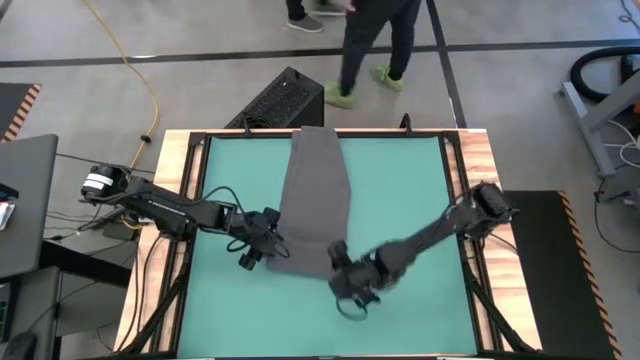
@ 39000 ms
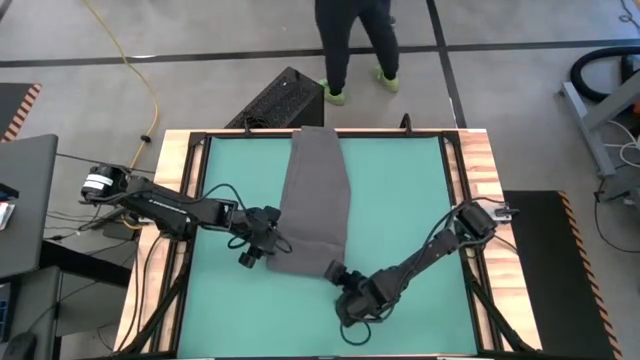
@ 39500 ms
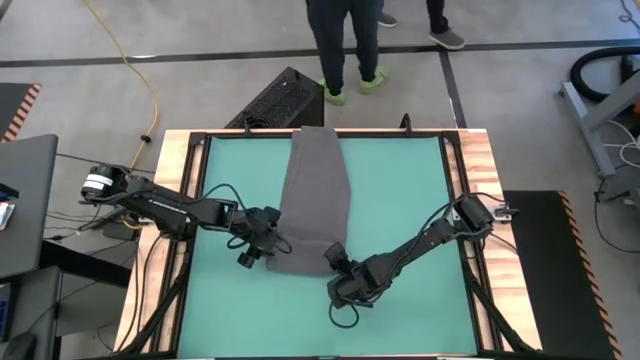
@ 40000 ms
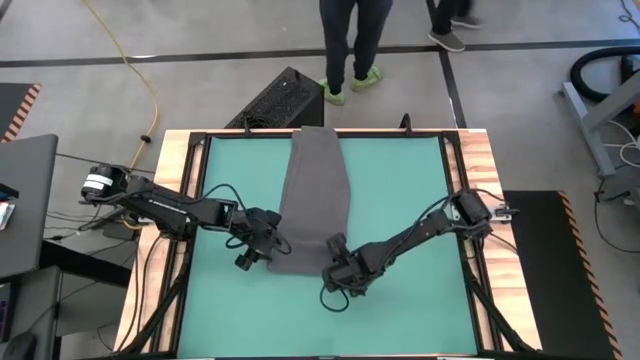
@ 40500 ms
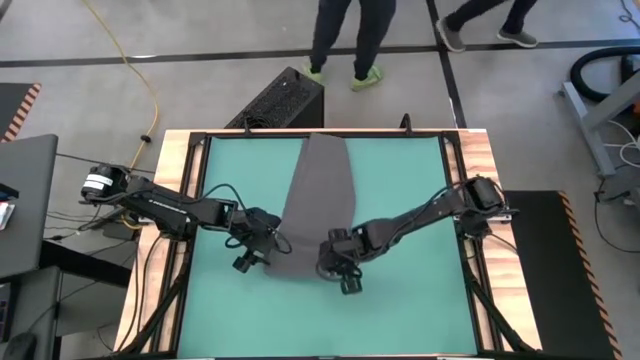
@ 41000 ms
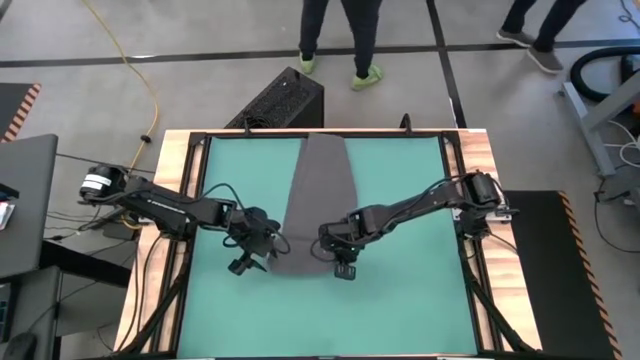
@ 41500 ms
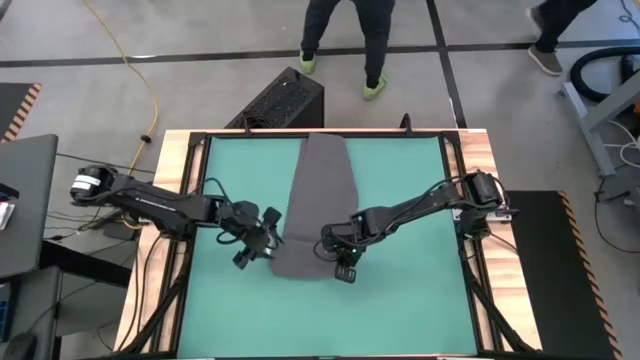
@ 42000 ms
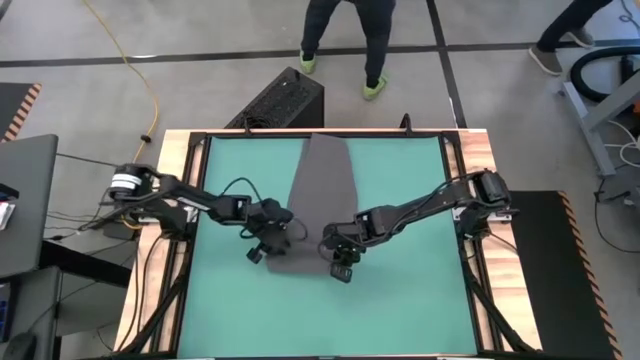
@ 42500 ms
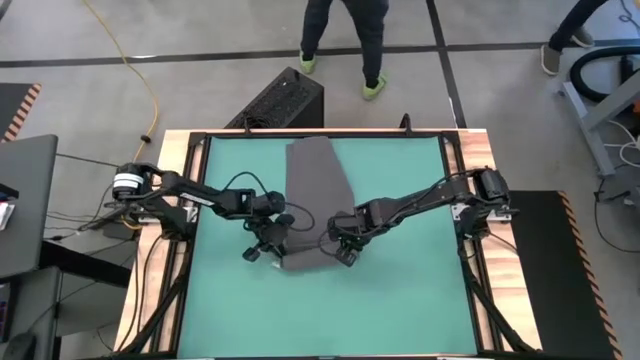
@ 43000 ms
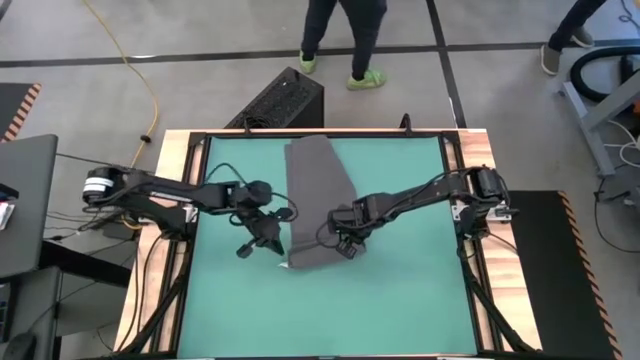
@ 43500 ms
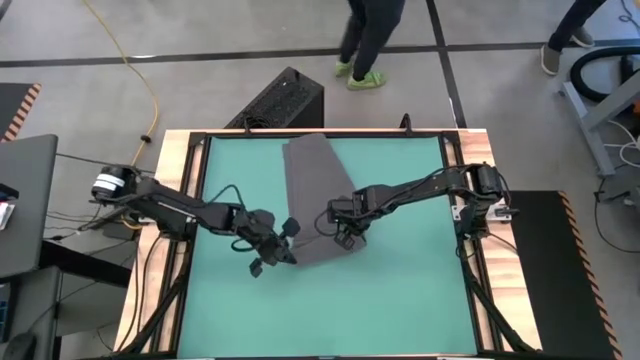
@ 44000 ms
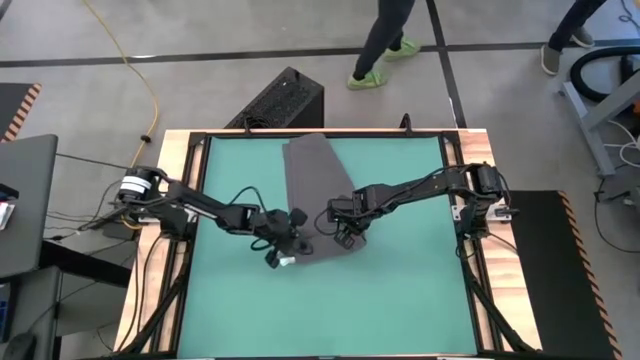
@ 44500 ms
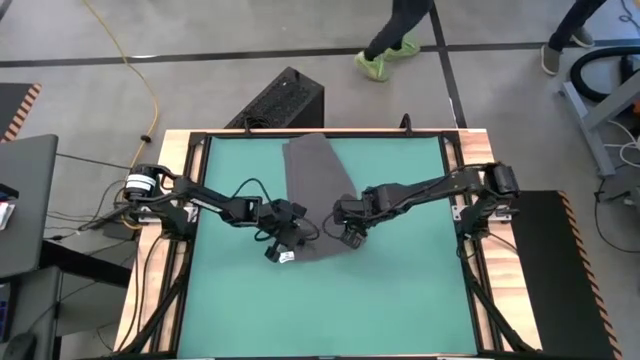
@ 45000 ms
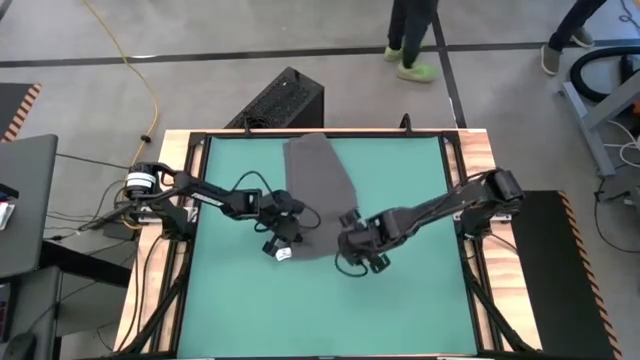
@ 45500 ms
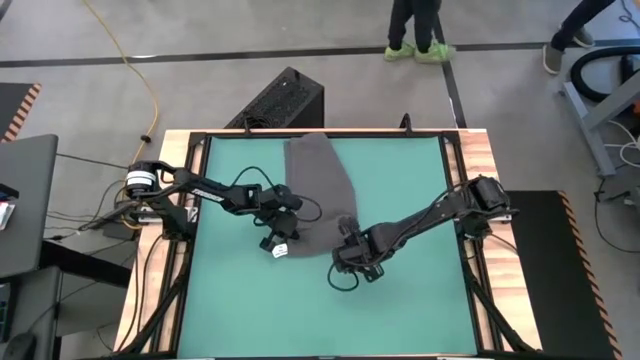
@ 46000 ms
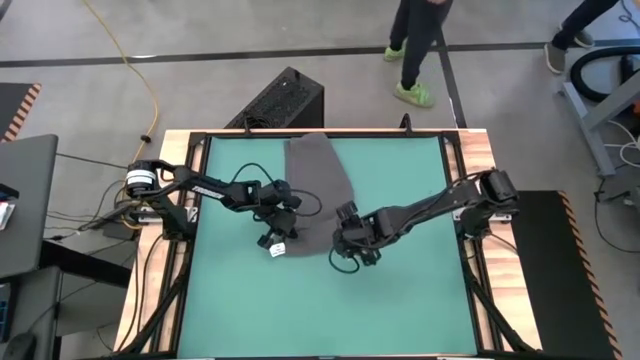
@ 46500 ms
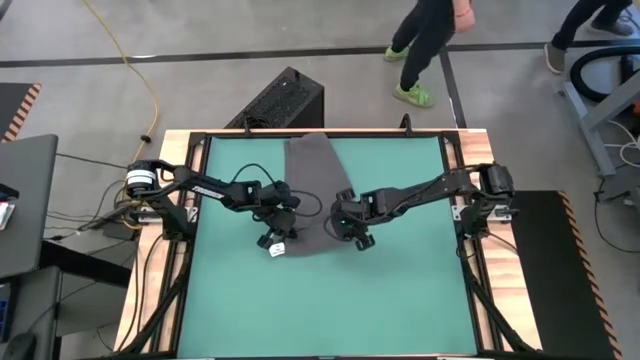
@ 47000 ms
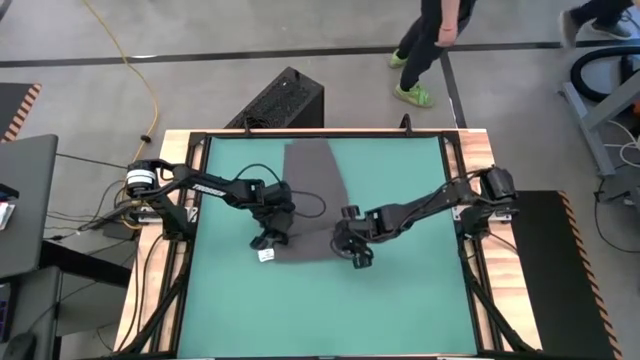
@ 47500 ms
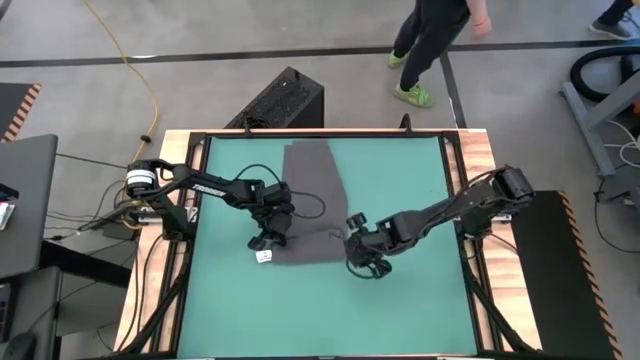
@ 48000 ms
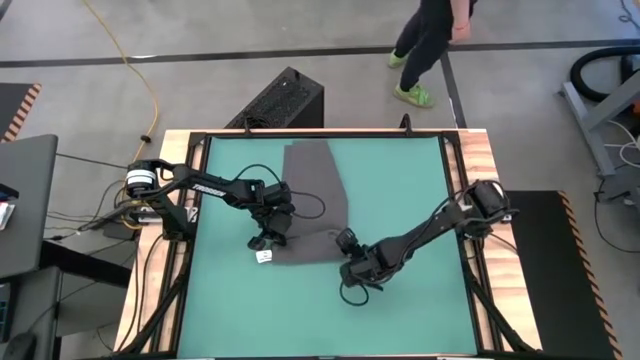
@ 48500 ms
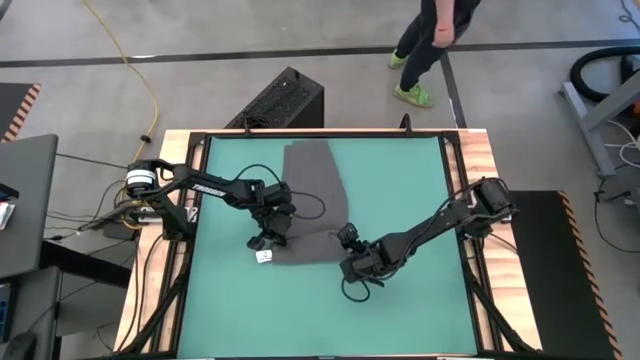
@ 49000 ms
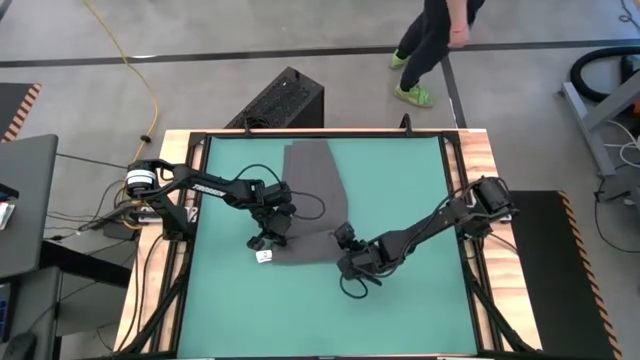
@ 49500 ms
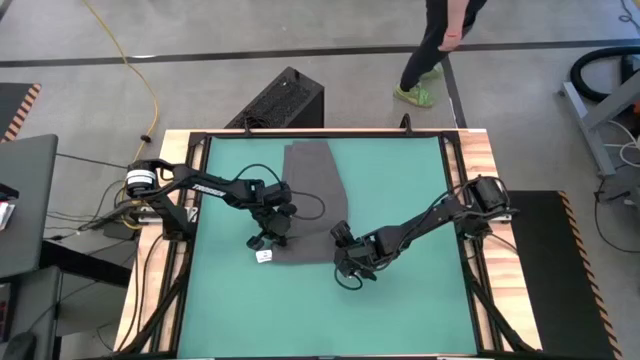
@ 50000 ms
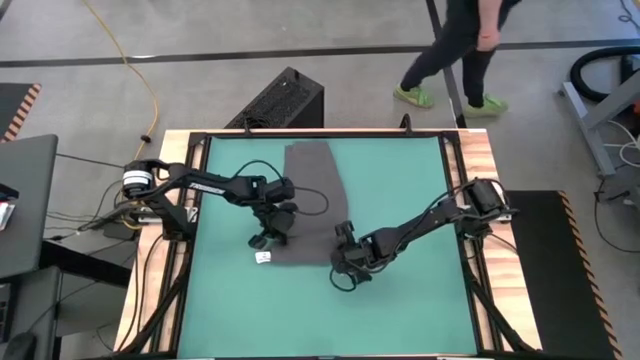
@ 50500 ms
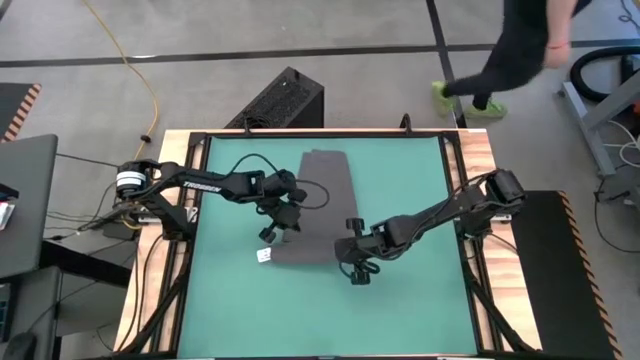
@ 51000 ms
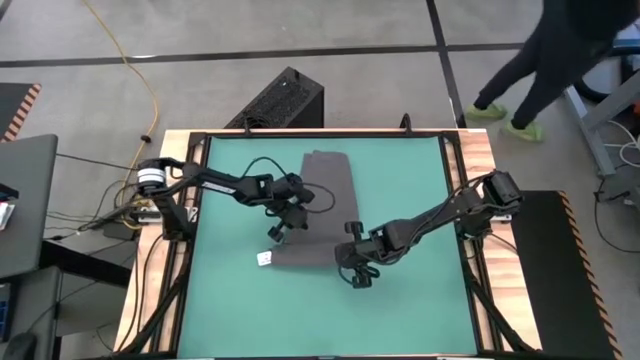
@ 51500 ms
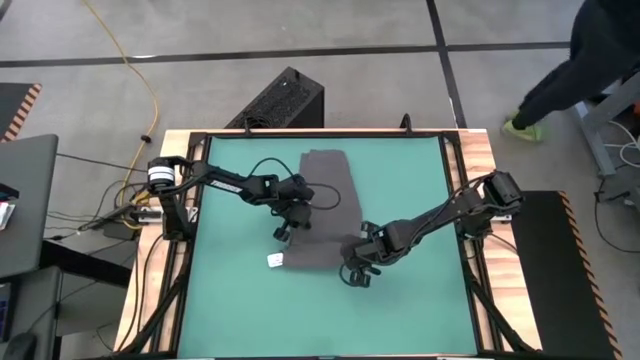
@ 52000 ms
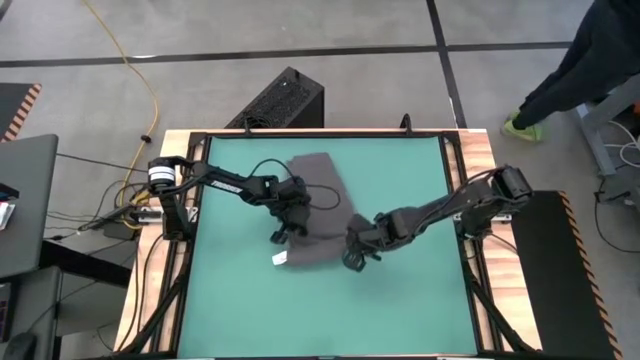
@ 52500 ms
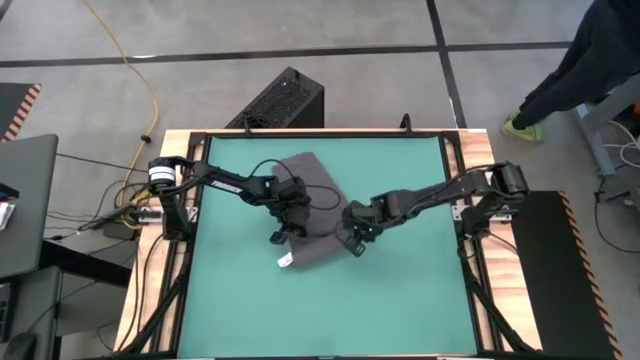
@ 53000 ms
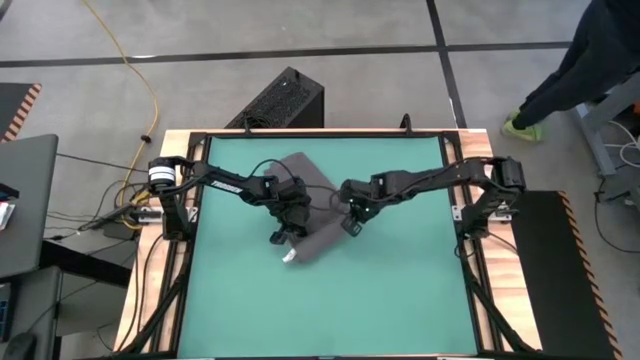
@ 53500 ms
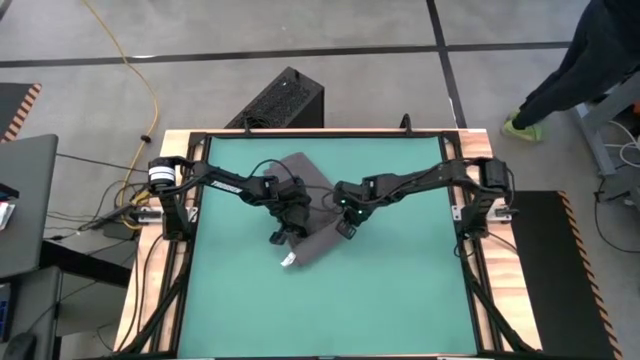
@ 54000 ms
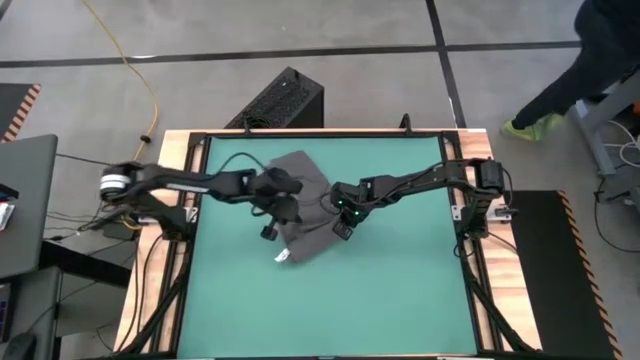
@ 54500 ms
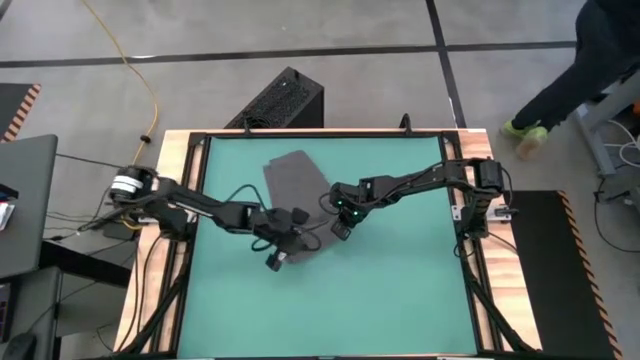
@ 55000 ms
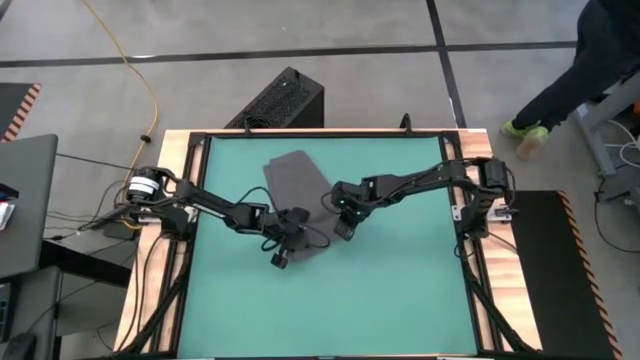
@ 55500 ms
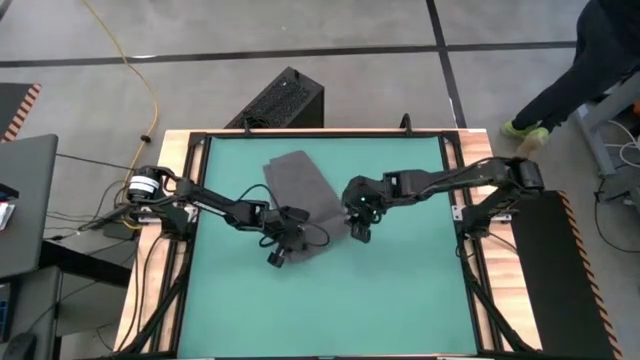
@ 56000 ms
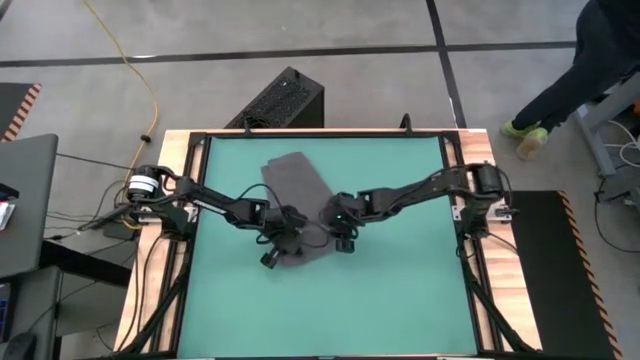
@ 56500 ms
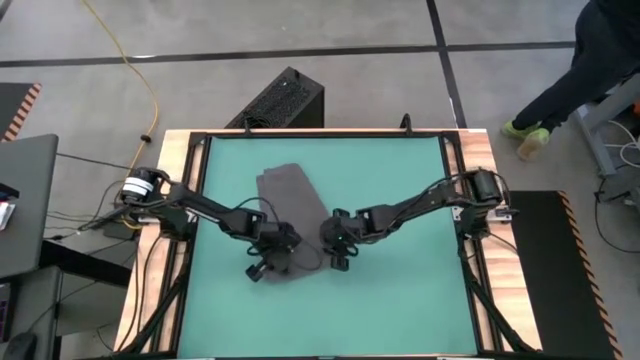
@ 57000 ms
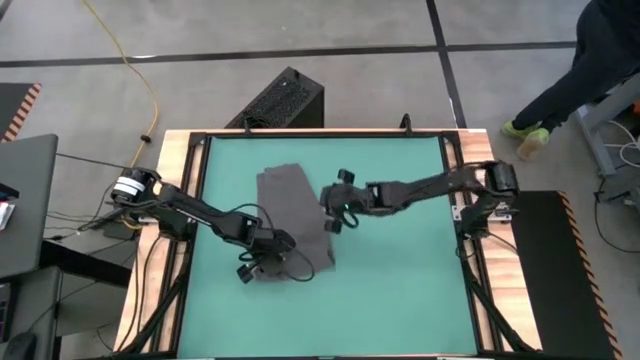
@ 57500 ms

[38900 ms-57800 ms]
Task: Roll towel into tight, uniform cylinder
Roll the gray towel

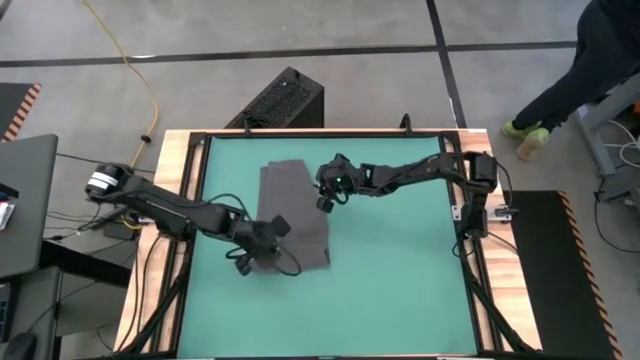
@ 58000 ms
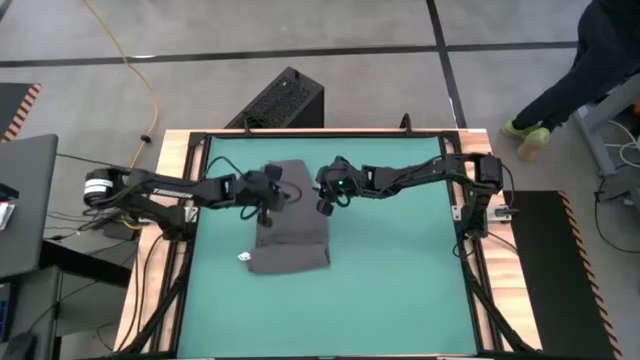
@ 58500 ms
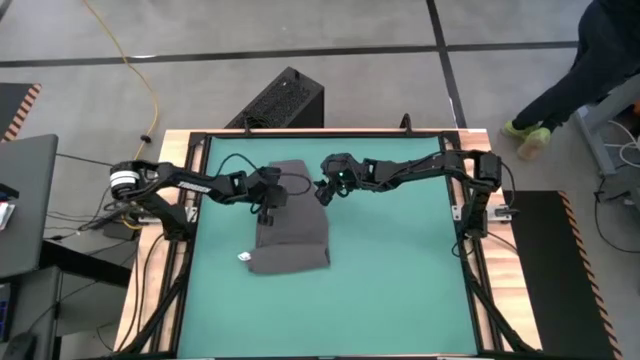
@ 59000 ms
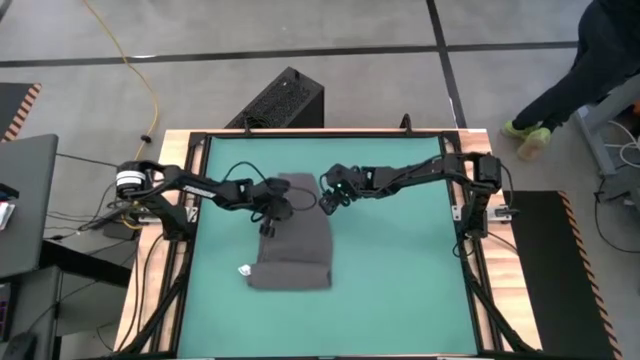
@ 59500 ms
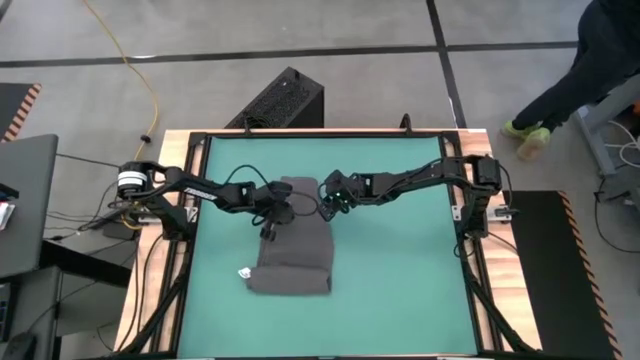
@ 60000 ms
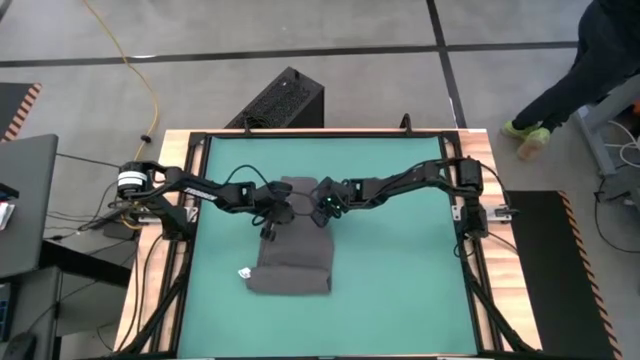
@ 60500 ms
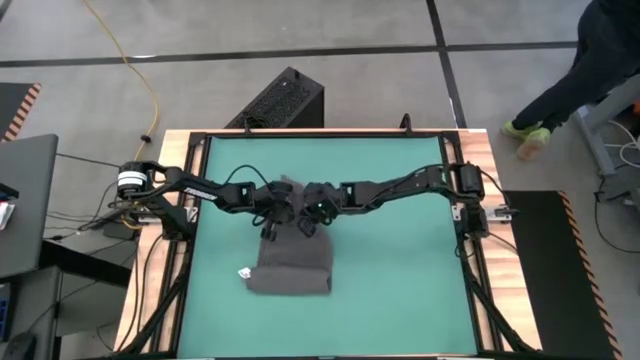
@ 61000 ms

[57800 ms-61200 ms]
Roll the gray towel
